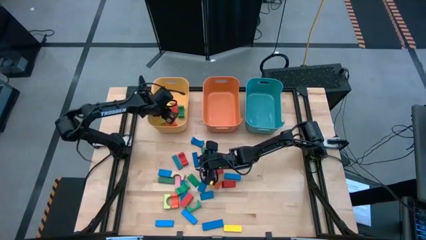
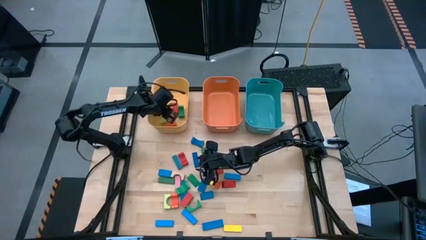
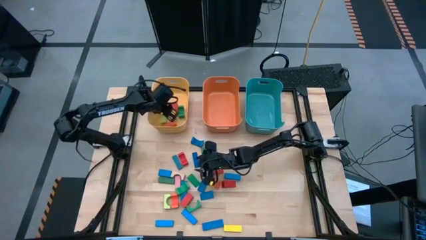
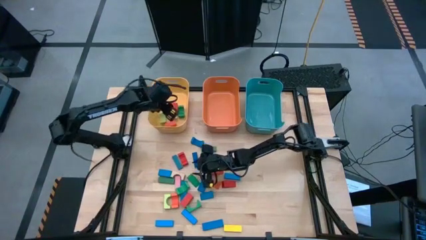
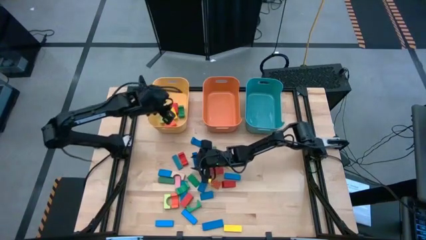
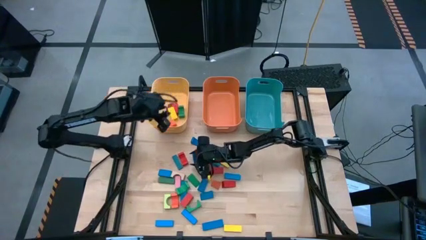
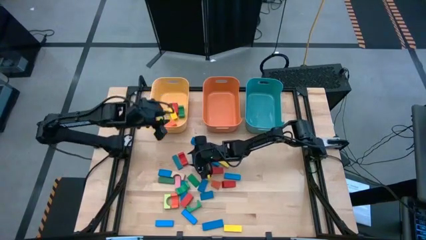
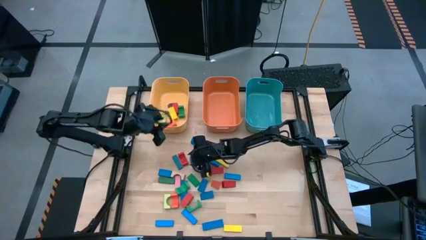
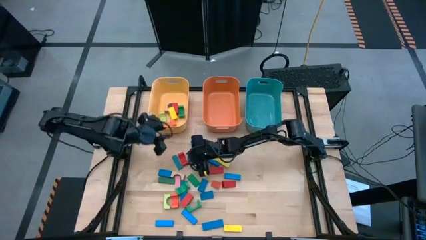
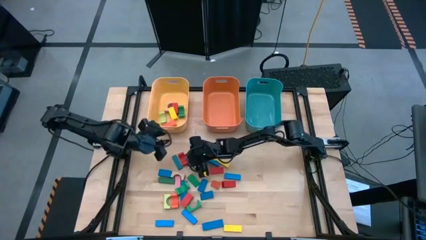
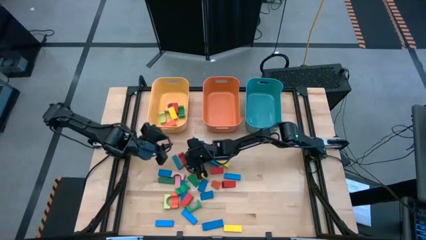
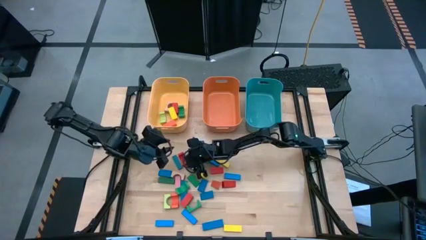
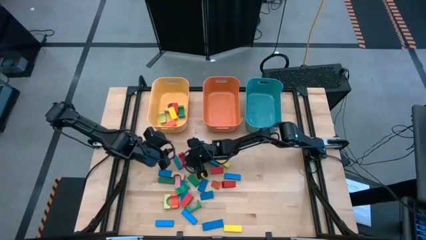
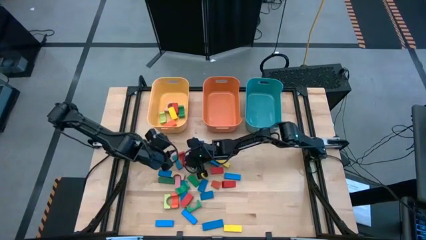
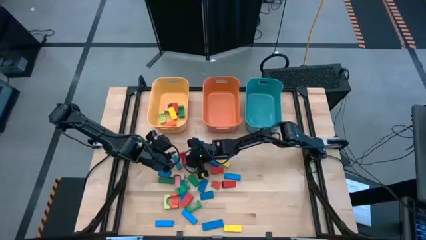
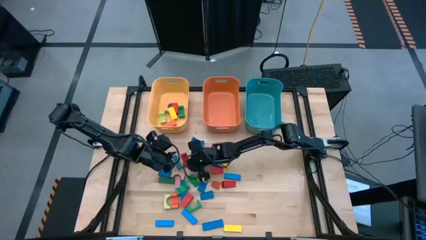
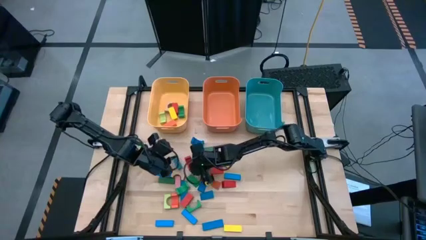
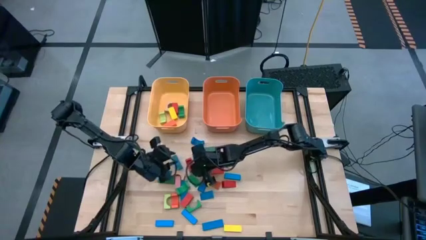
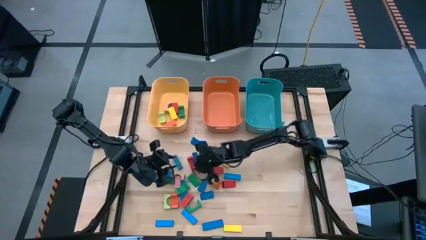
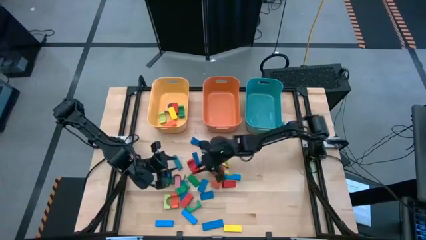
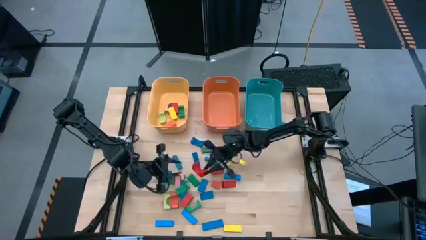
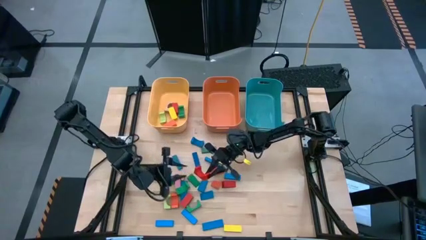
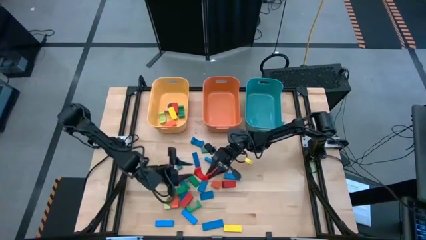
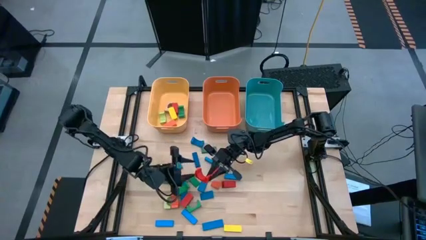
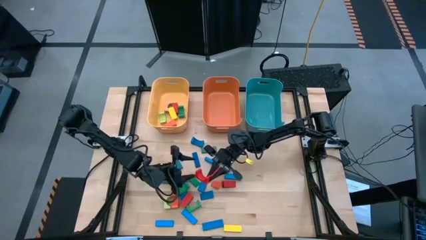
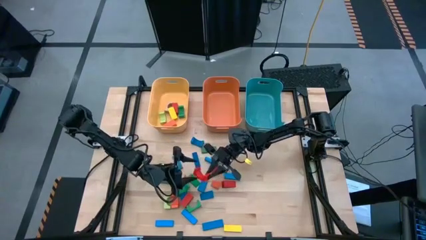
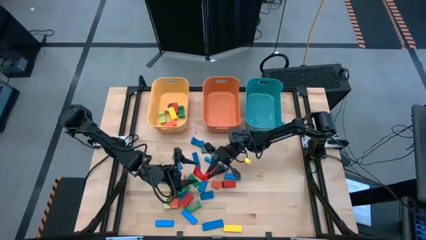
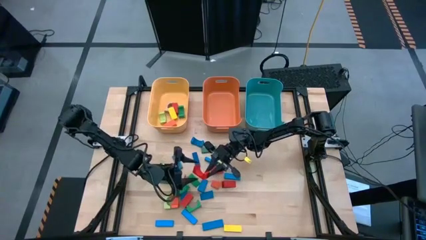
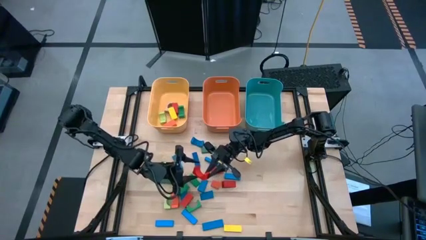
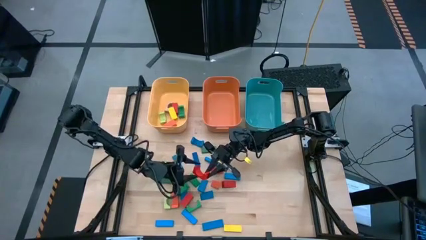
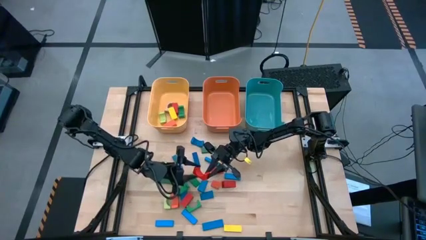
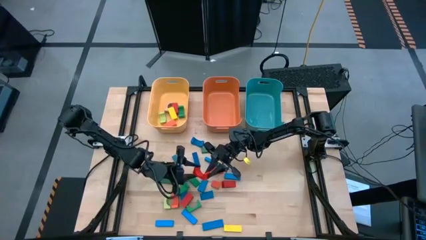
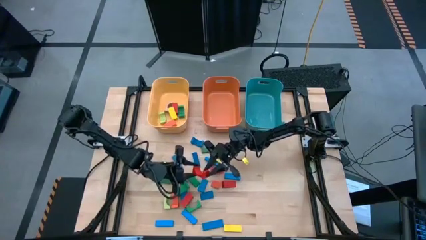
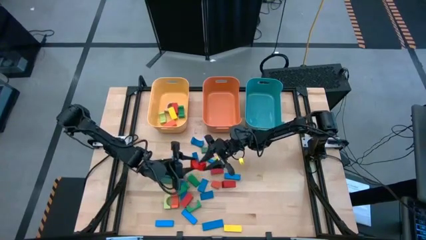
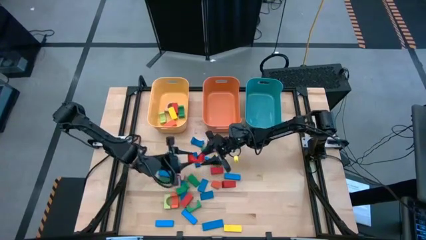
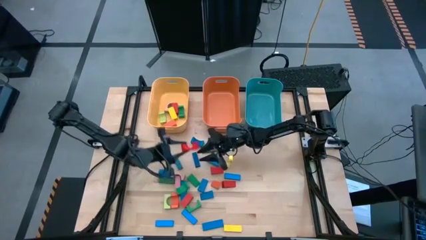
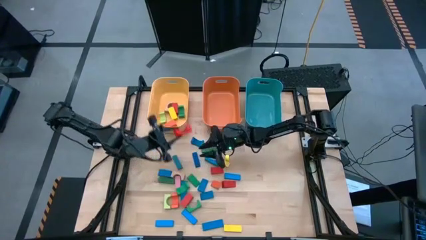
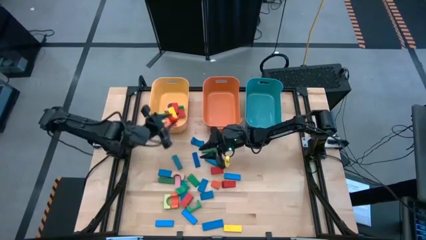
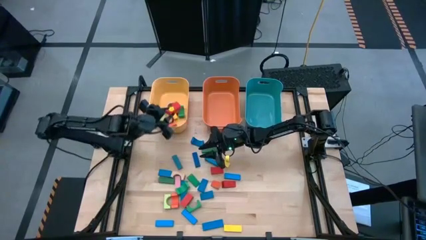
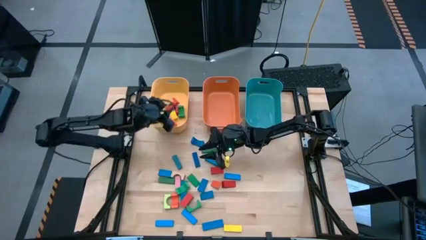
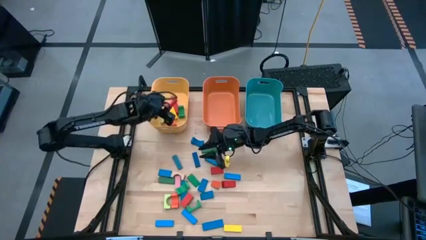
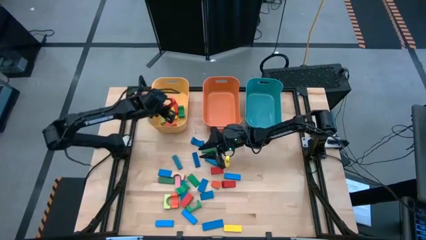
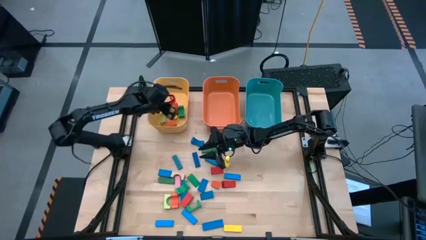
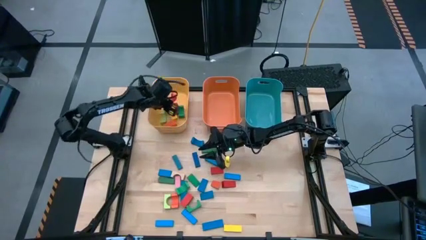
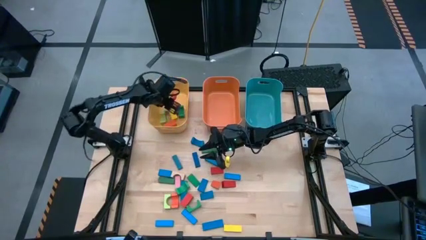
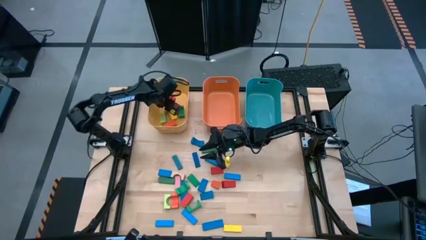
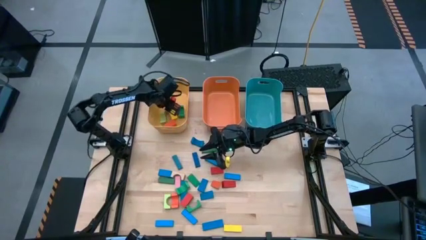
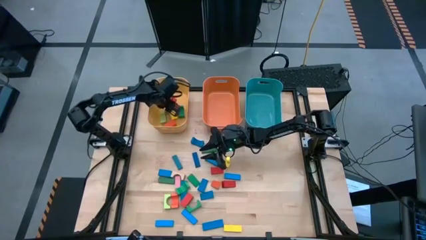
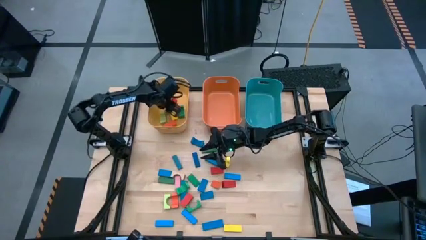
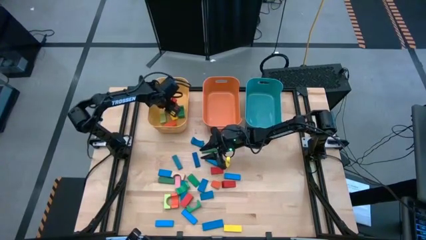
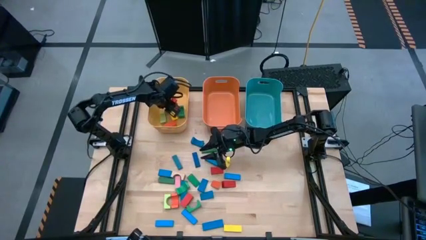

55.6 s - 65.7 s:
Task: Sort blocks by size
Put the red arch block into the yellow bin
